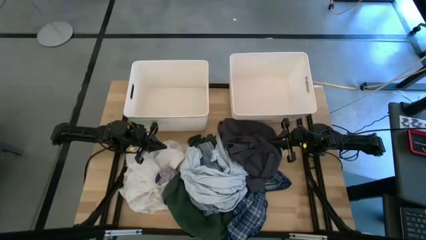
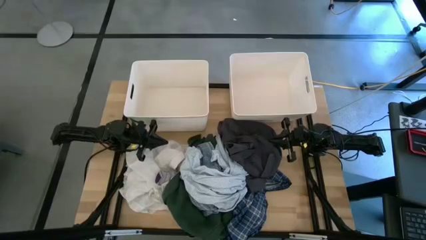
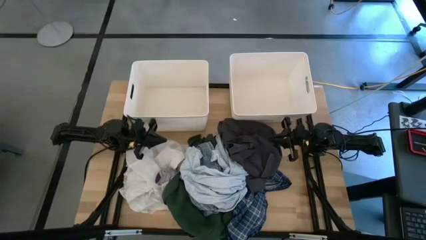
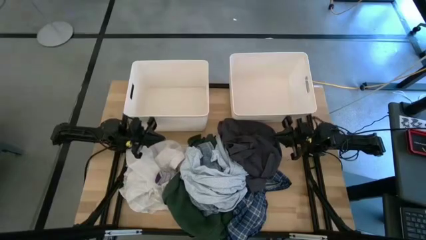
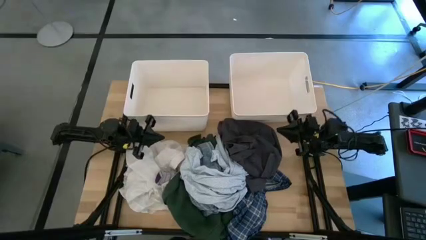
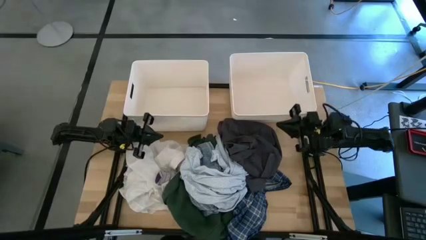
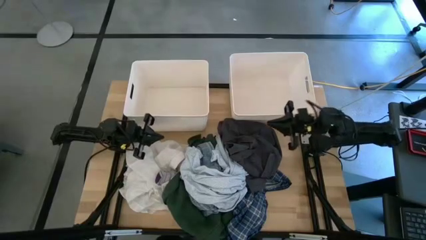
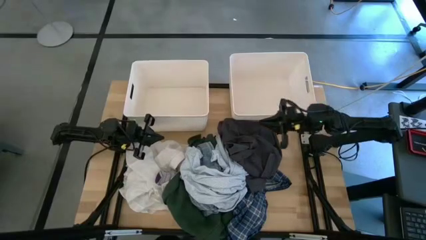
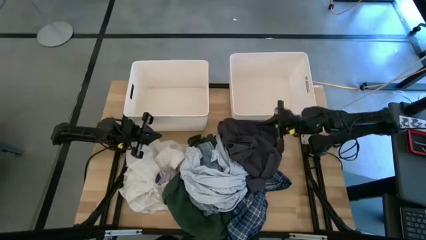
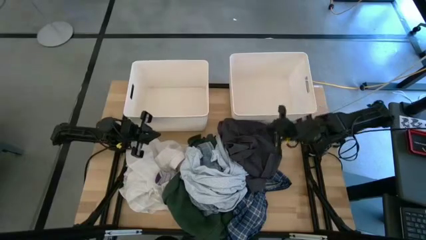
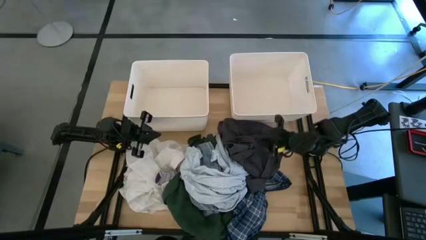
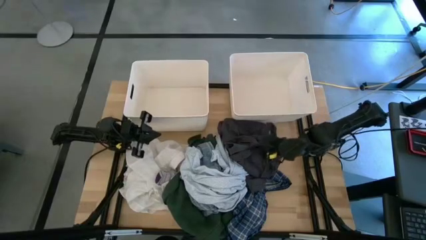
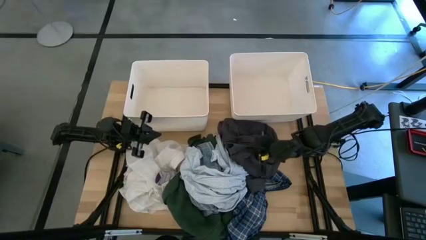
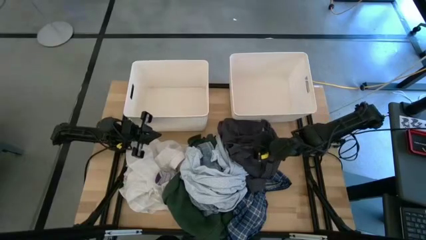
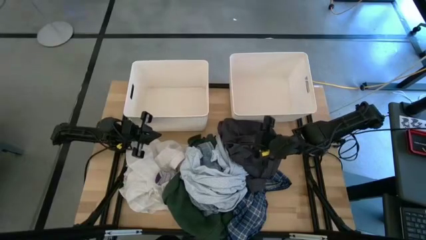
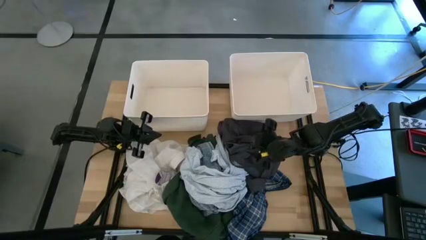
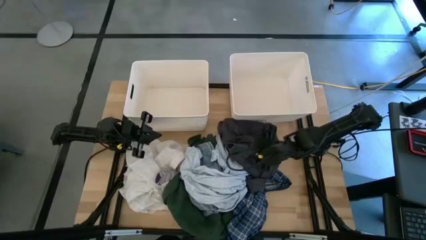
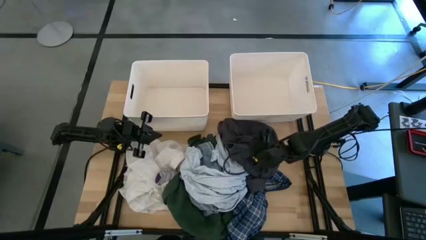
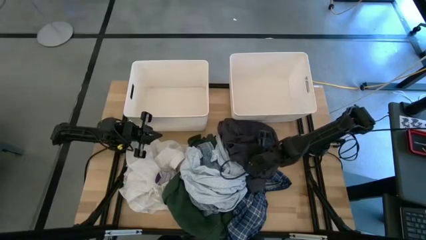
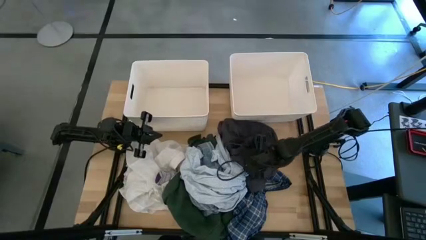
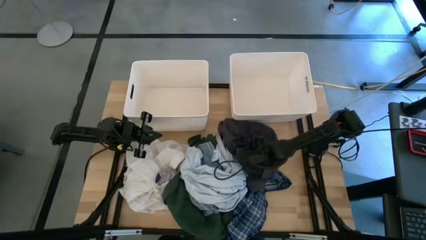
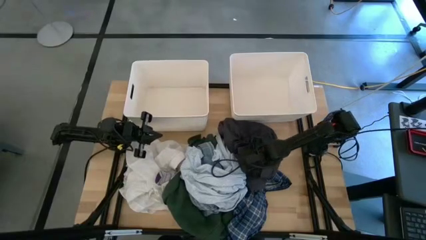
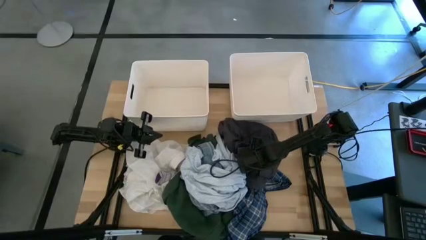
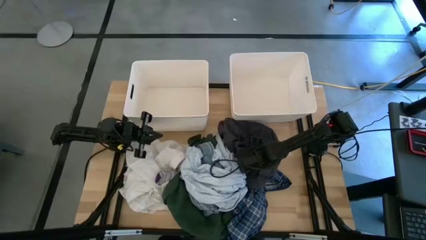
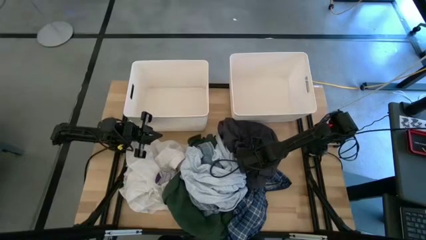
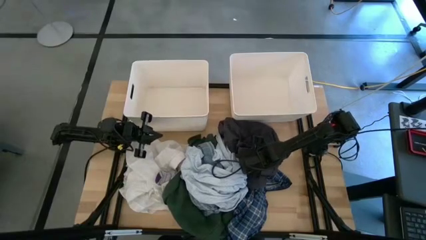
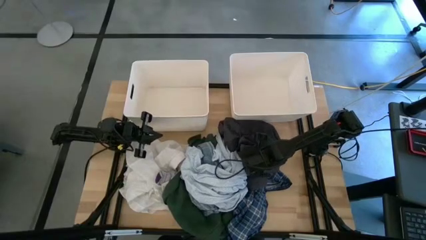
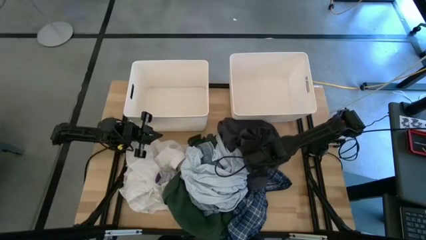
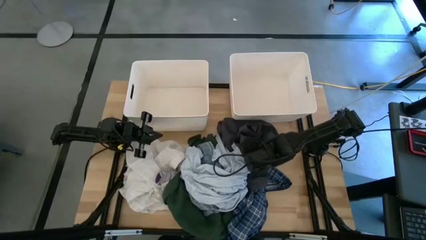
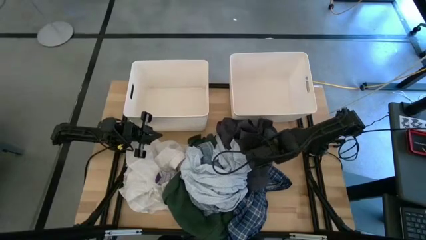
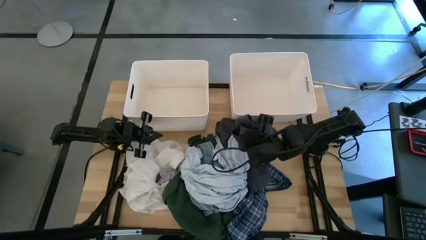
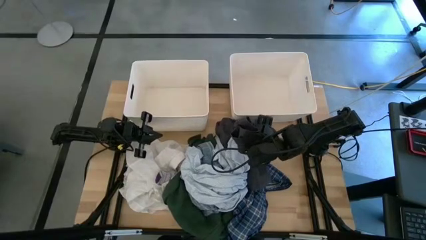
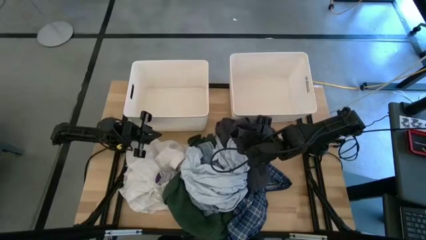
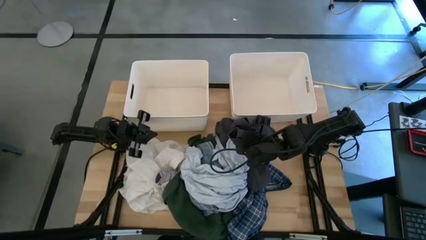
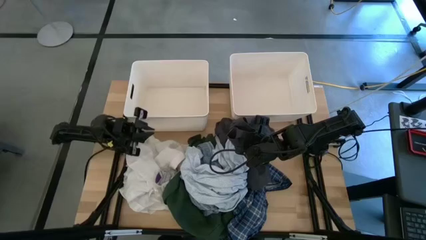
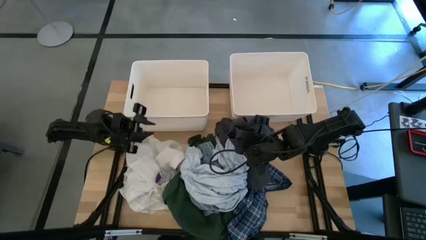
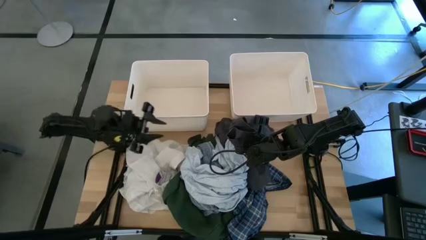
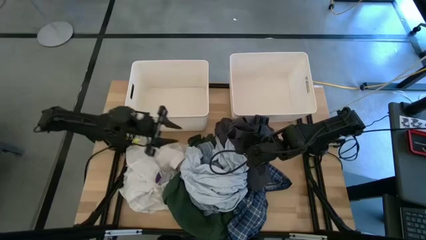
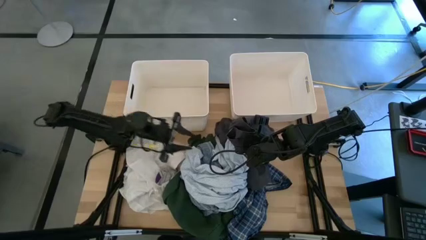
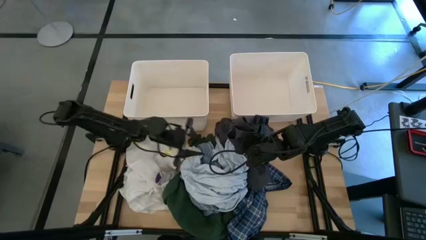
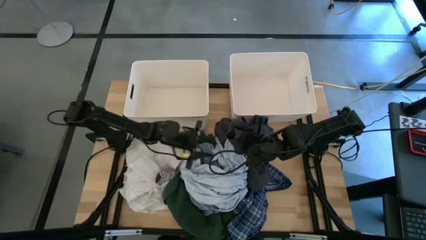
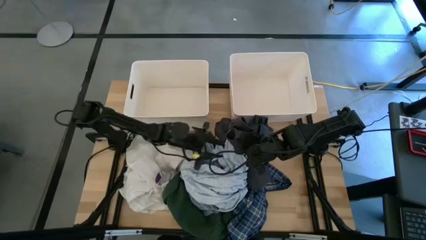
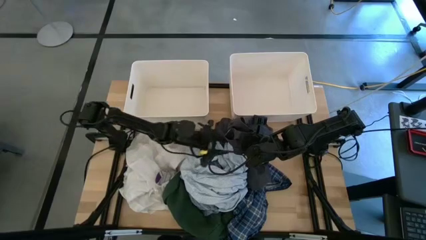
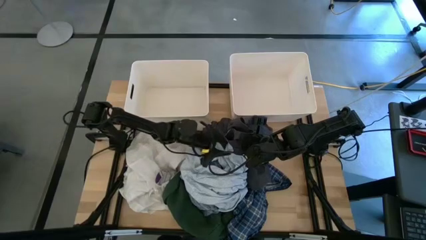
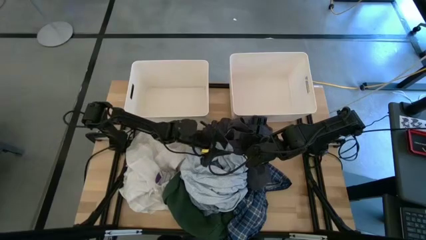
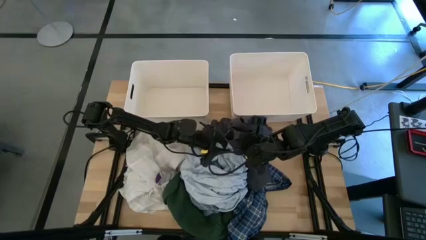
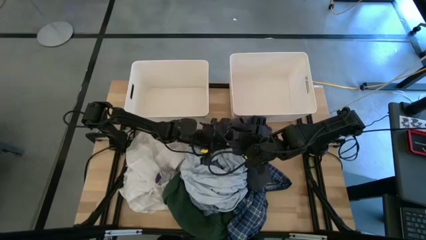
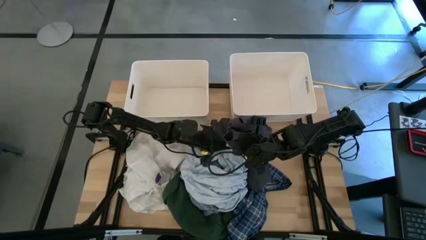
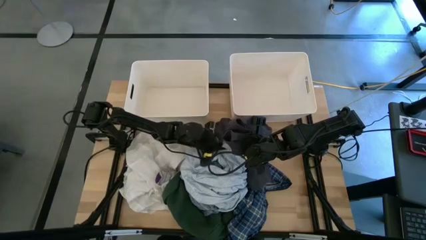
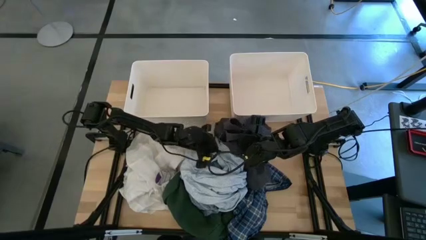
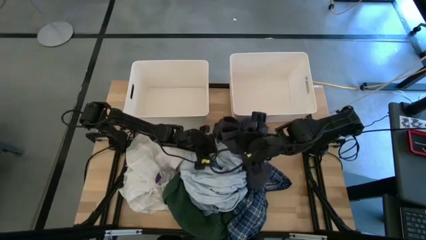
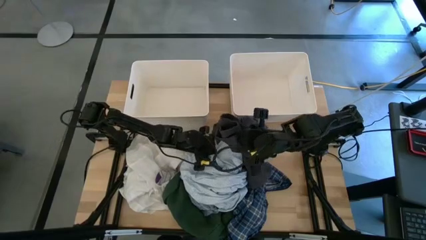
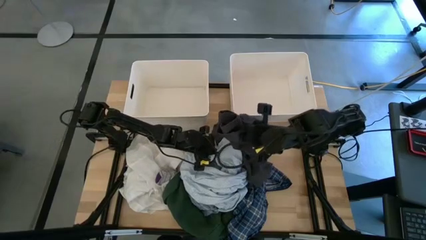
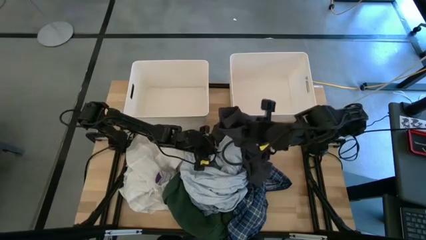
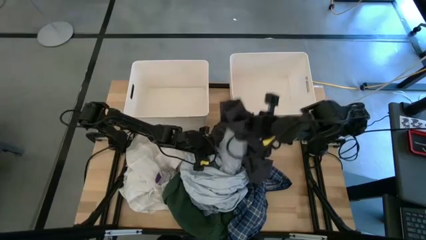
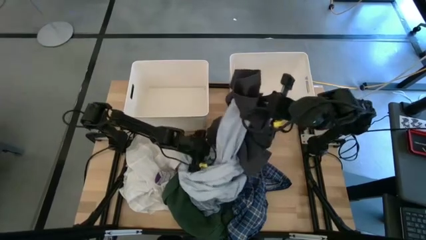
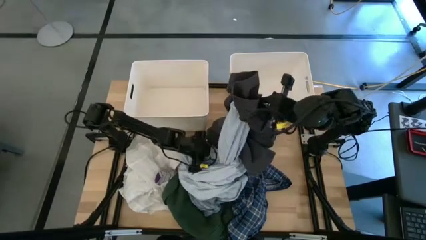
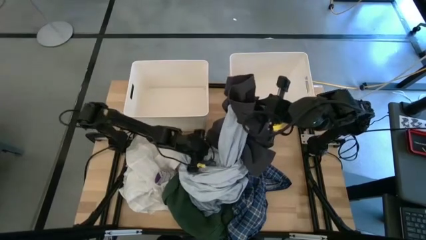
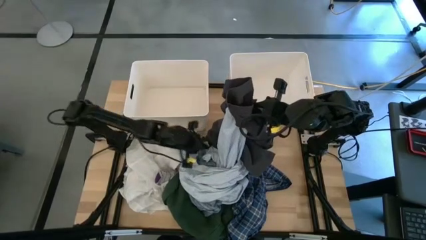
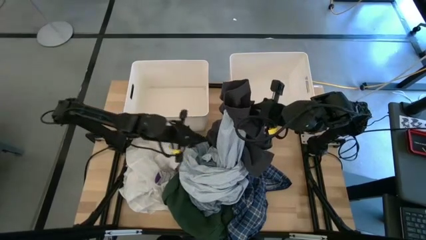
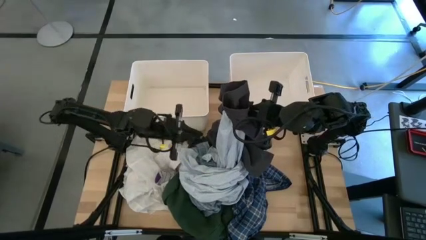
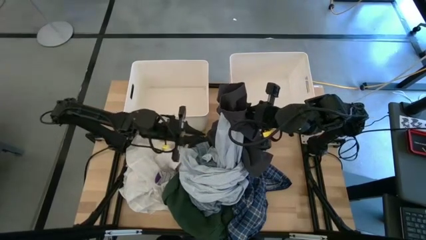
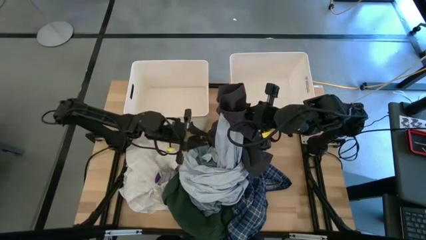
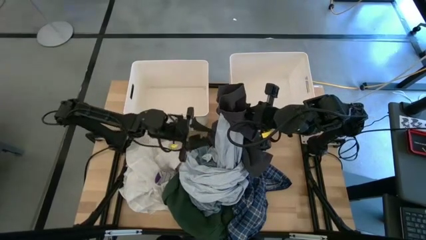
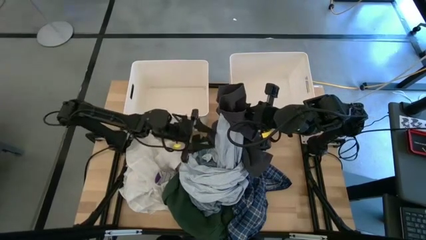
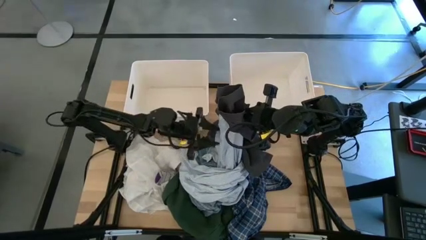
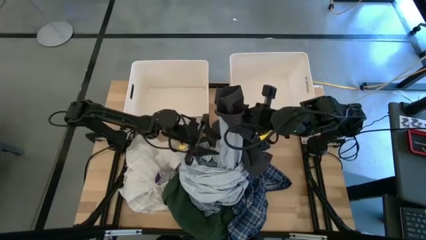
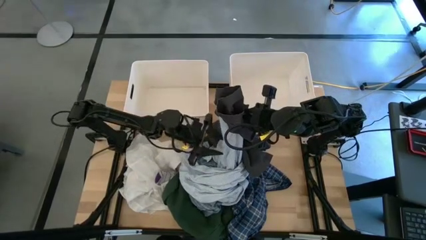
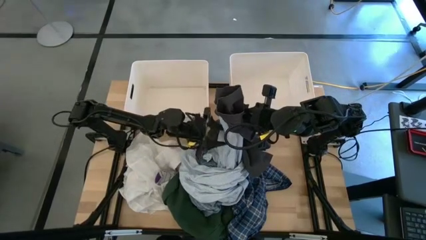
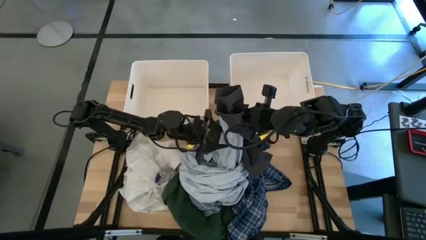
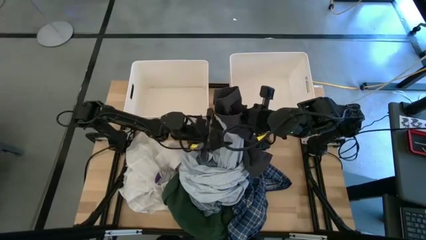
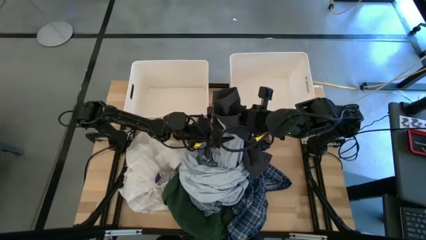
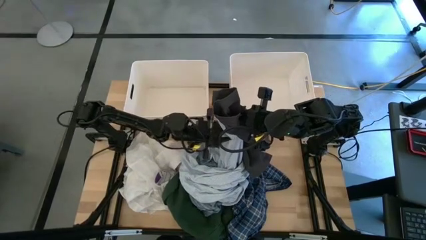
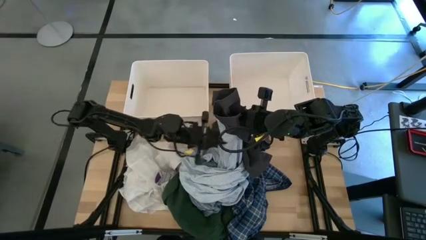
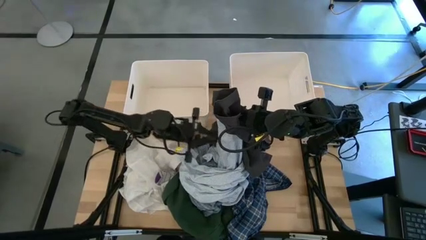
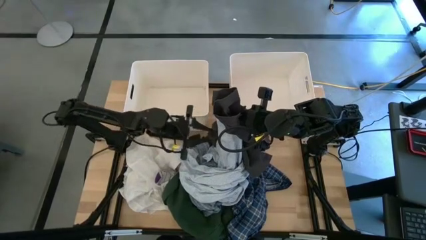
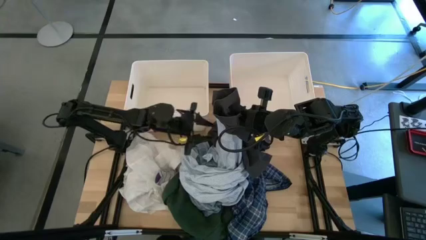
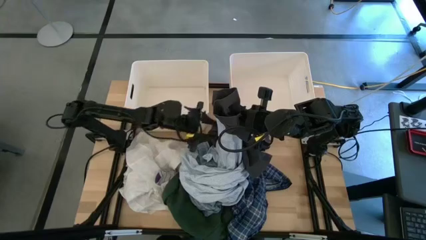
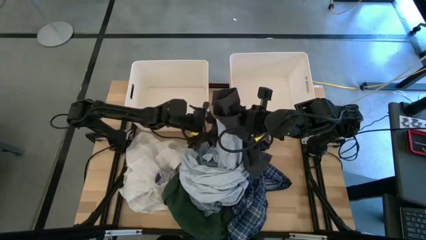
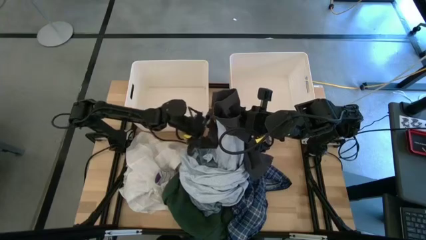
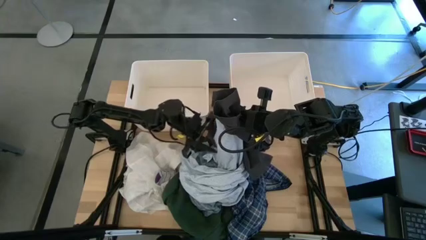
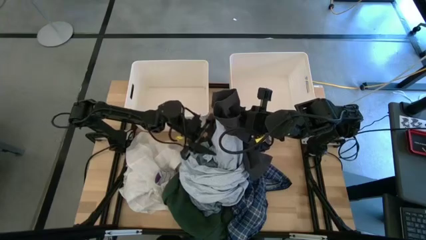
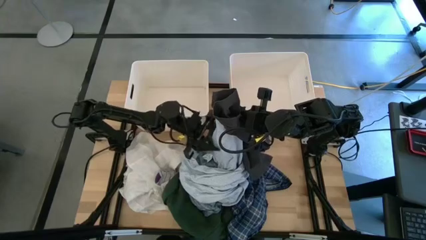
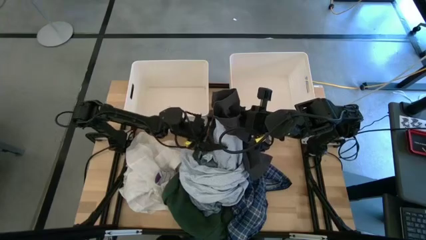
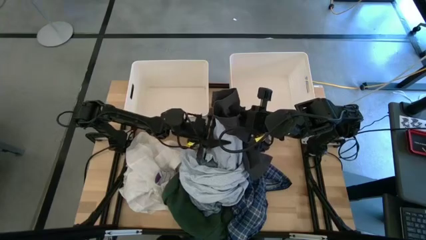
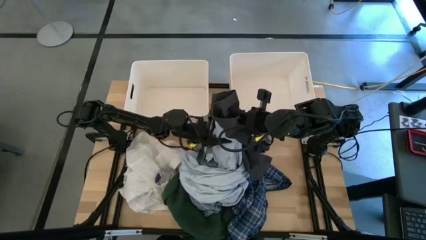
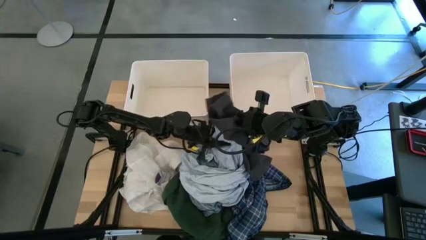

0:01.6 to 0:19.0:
Task: Sort clothes
Put the black pants into the right white bin
